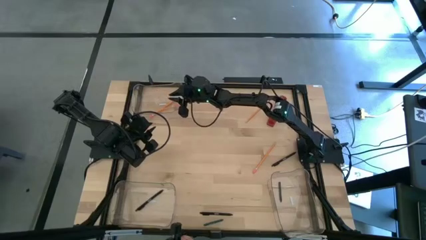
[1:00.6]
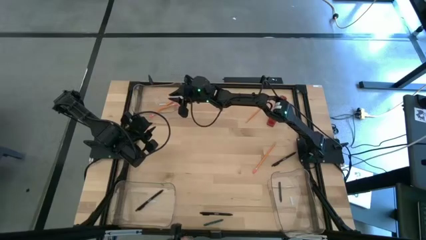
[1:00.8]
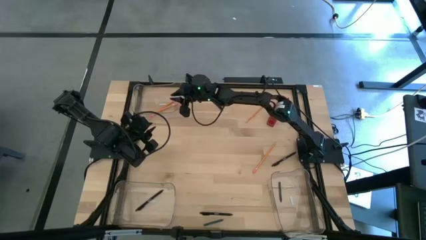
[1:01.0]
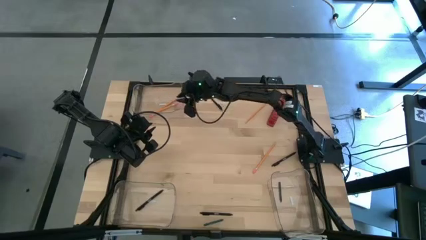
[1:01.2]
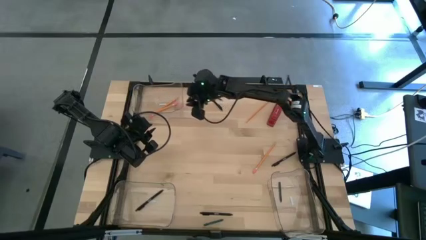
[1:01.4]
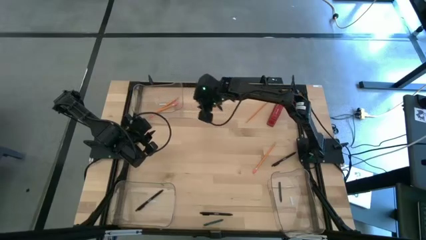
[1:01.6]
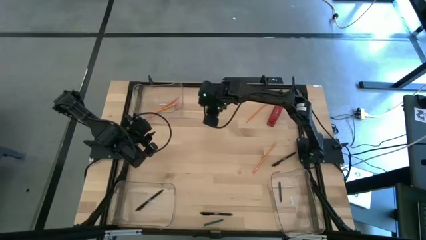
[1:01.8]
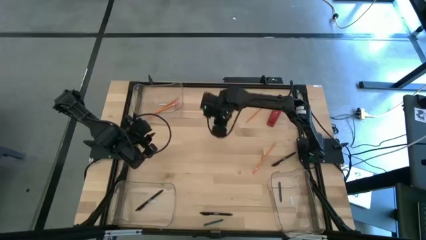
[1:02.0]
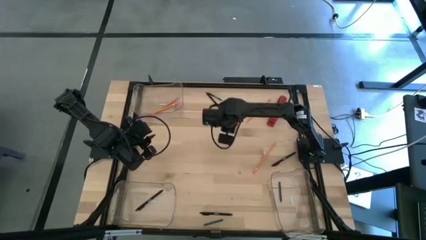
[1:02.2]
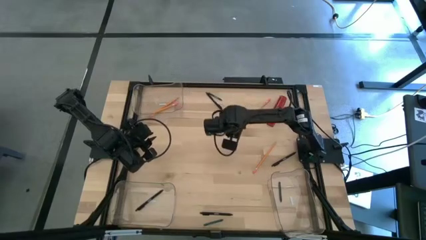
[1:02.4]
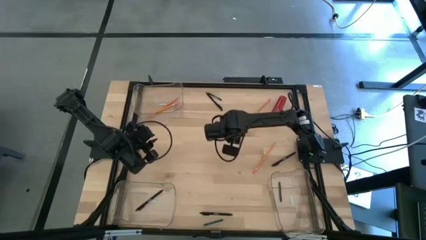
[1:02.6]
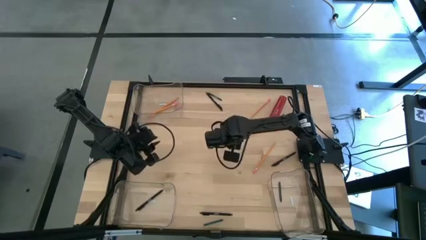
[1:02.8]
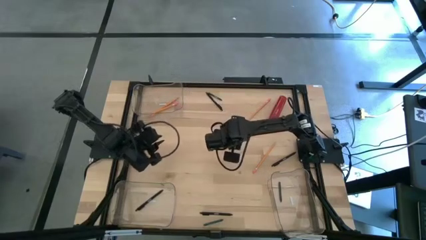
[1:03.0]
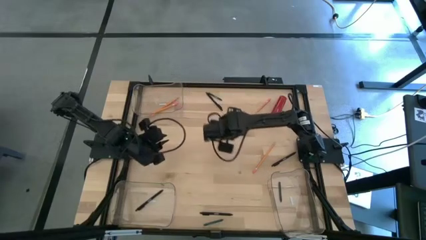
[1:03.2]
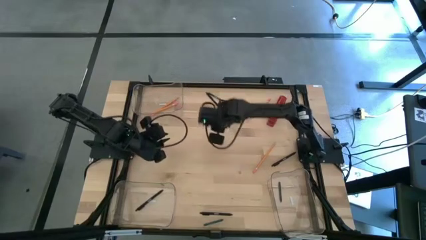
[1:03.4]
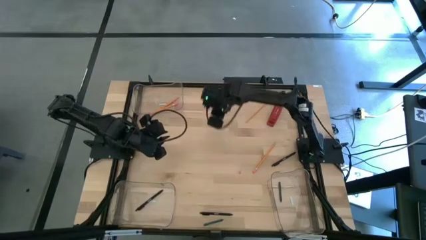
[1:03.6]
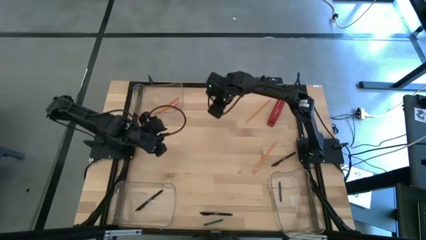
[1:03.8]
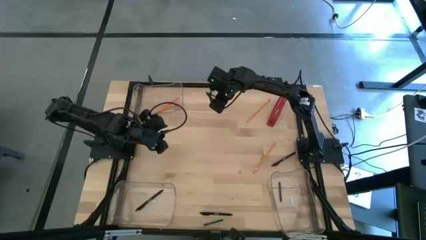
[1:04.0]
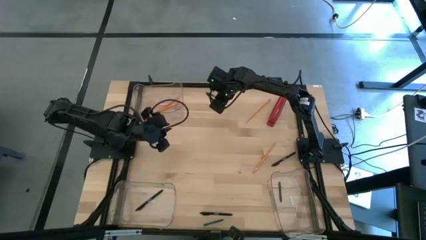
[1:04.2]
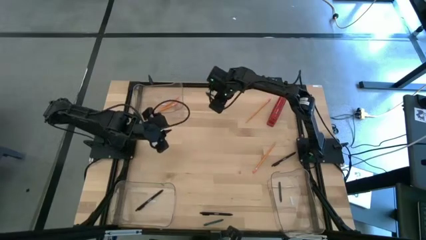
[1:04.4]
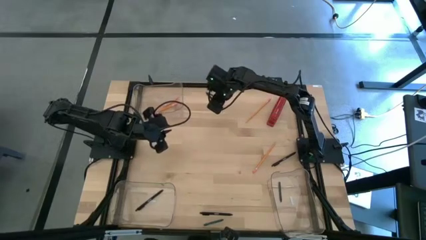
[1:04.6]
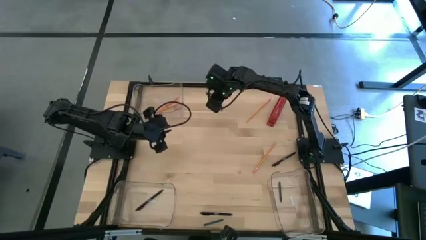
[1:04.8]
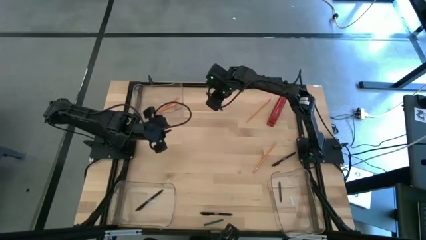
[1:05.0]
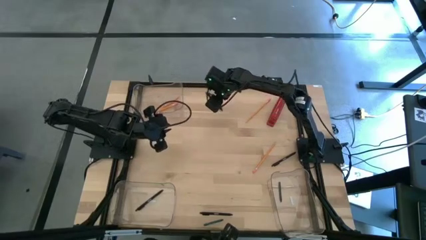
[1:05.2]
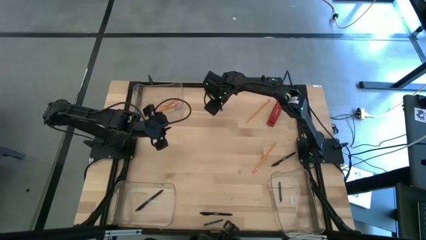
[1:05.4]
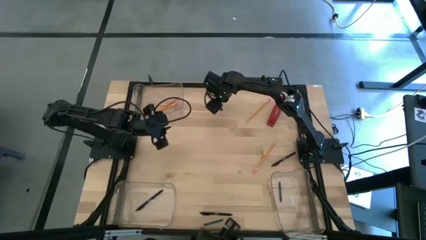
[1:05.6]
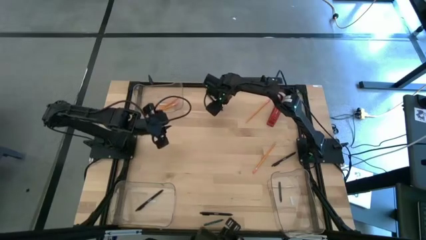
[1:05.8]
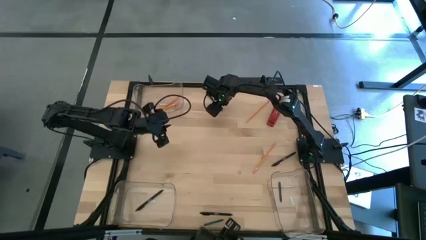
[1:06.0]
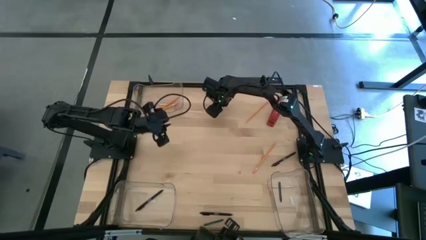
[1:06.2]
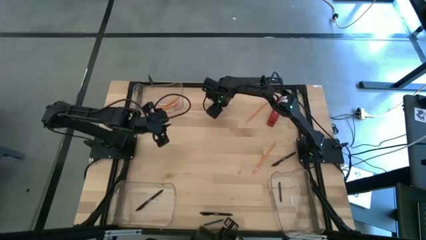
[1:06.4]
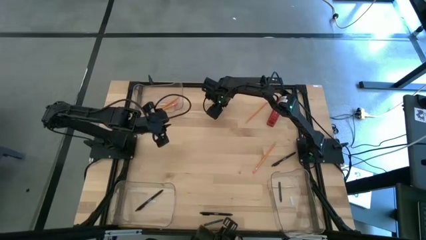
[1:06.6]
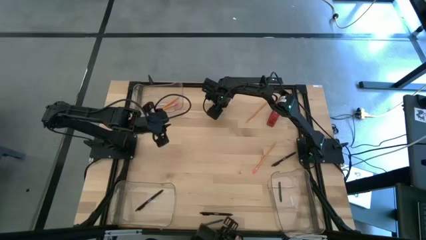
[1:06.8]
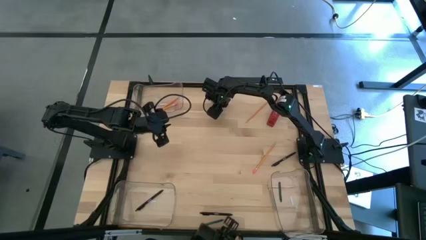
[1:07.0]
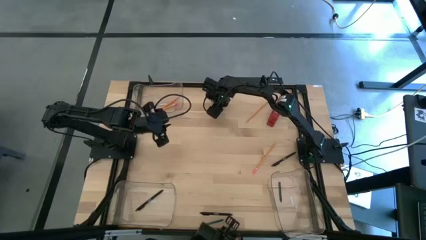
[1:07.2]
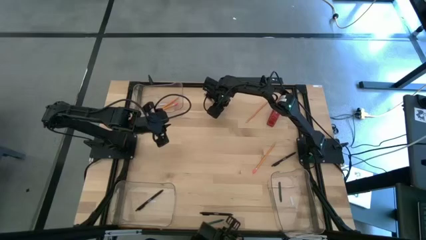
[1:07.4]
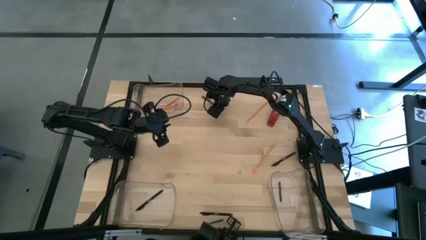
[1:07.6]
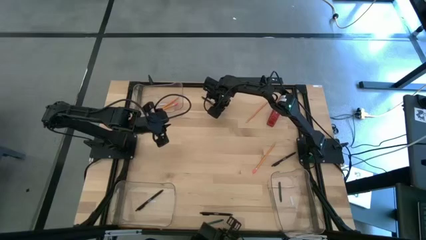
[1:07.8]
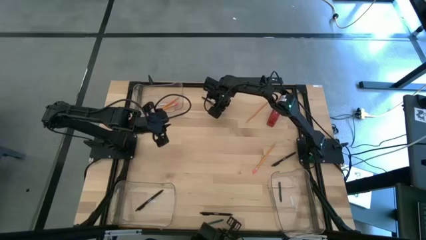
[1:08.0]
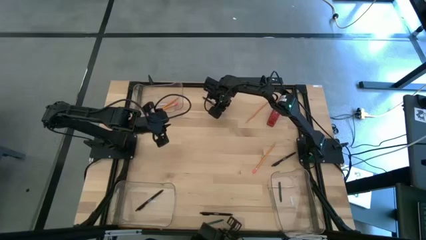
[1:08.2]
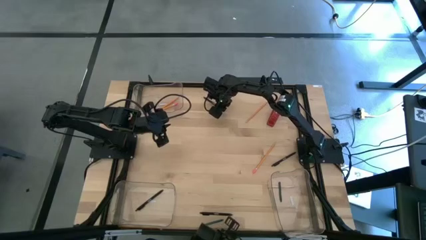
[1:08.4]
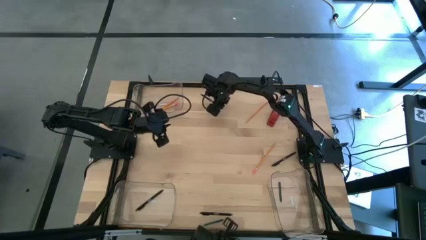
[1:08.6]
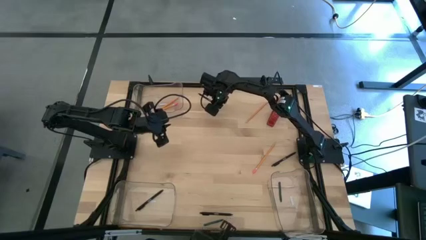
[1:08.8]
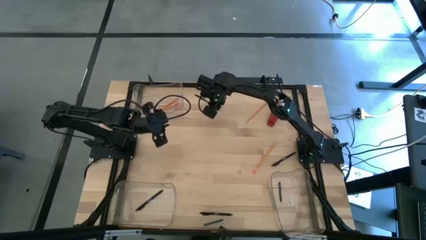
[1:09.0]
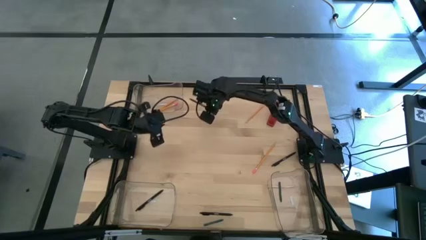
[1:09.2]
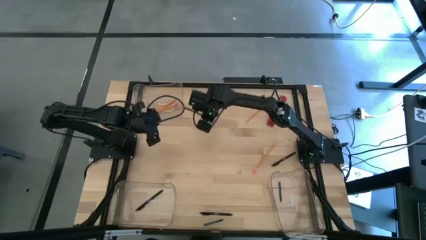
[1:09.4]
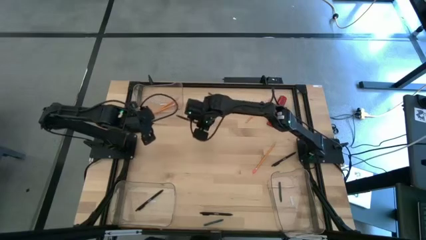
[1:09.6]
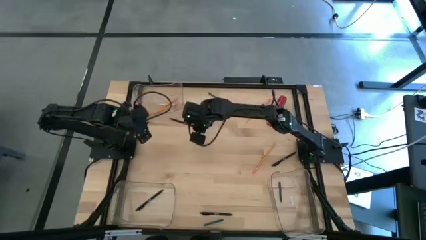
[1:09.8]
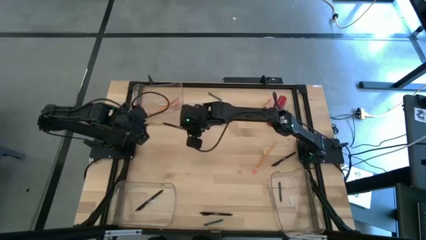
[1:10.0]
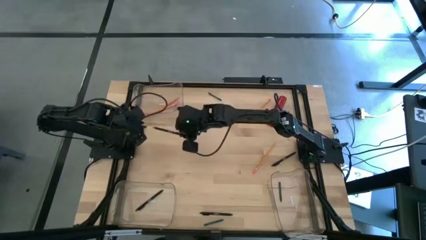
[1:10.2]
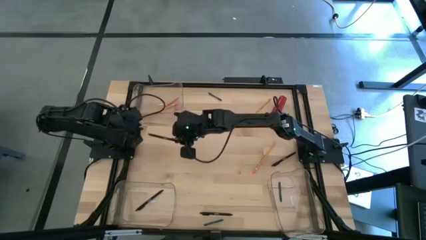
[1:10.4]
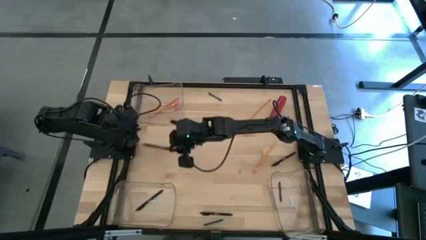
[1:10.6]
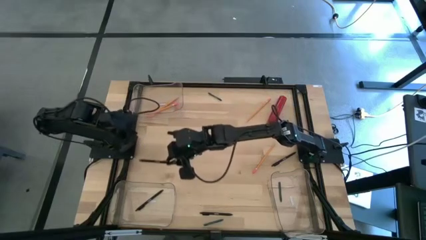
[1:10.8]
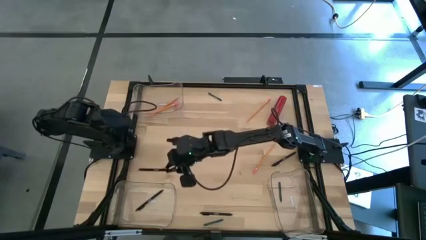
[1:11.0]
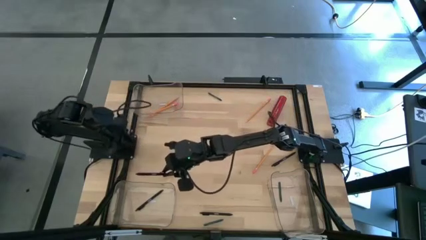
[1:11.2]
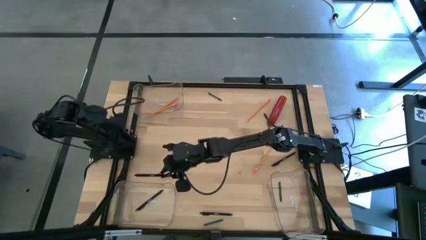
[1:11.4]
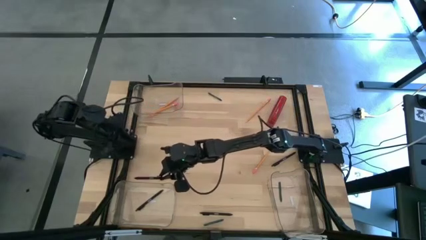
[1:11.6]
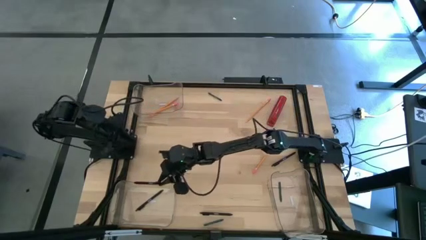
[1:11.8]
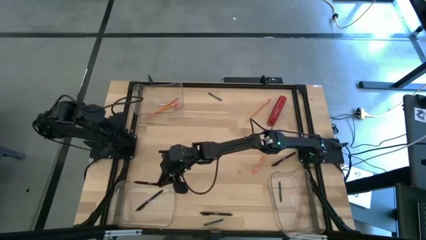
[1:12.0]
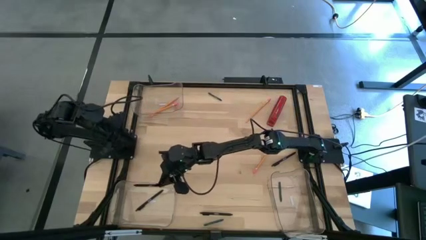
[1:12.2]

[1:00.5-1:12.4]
Task: Sort crayons/erasers/pens/pencils in bins
Put the black pen into the bottom left transparent bin

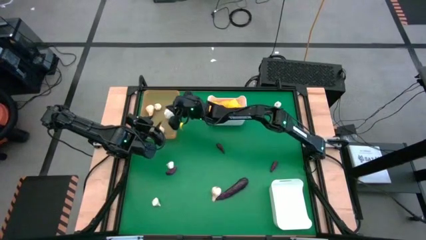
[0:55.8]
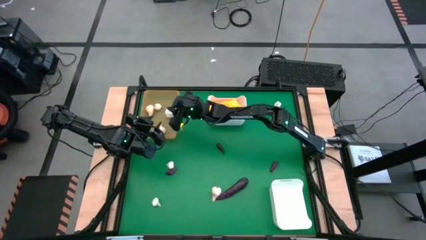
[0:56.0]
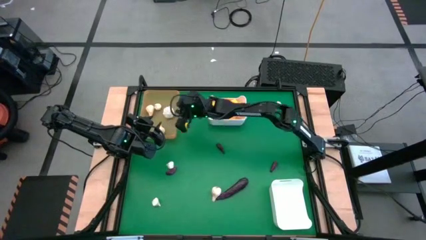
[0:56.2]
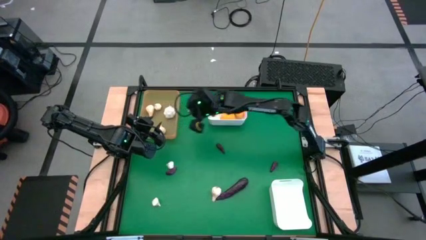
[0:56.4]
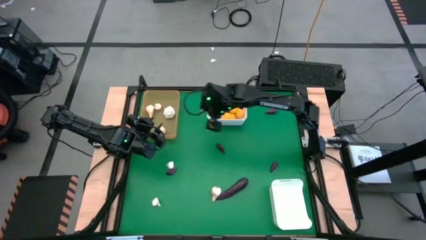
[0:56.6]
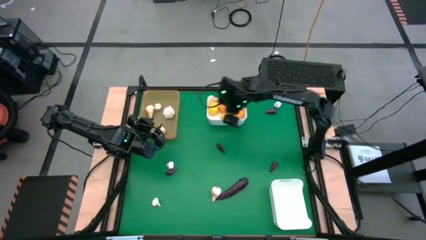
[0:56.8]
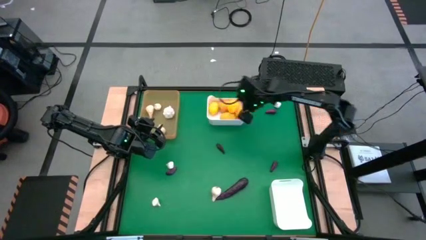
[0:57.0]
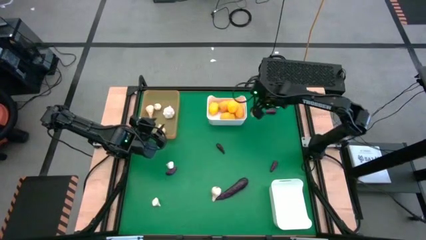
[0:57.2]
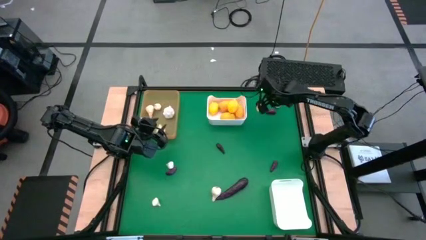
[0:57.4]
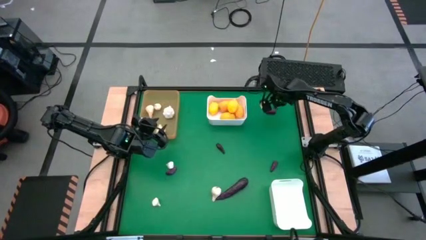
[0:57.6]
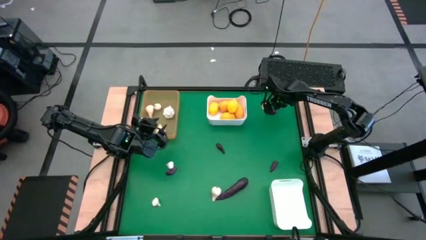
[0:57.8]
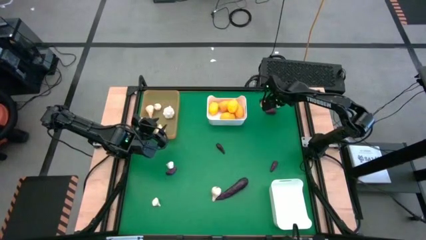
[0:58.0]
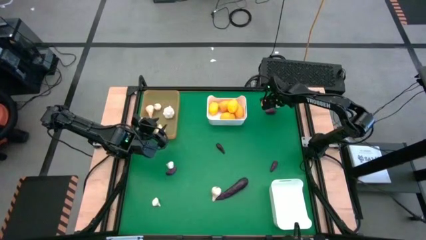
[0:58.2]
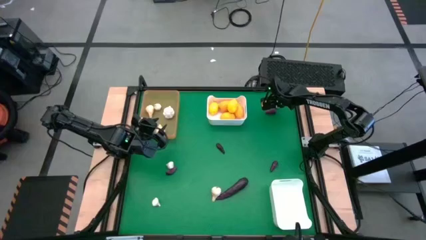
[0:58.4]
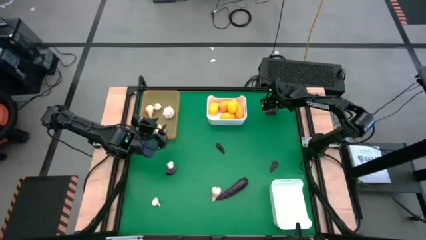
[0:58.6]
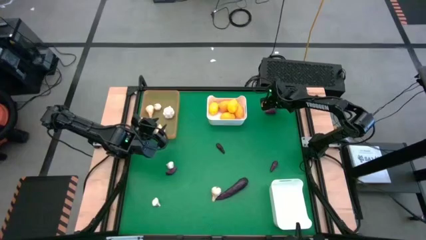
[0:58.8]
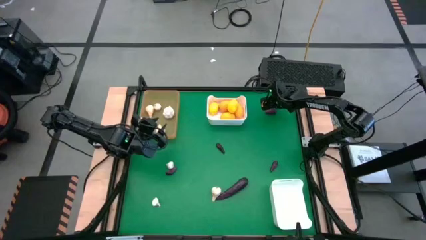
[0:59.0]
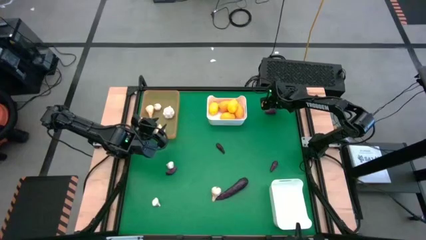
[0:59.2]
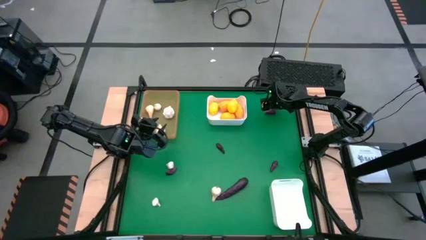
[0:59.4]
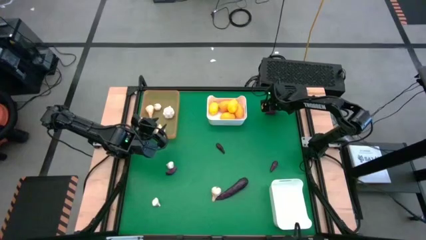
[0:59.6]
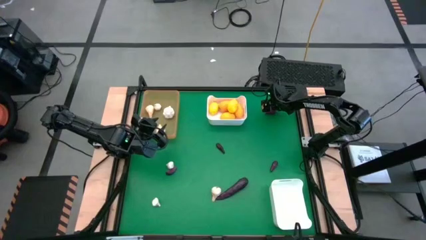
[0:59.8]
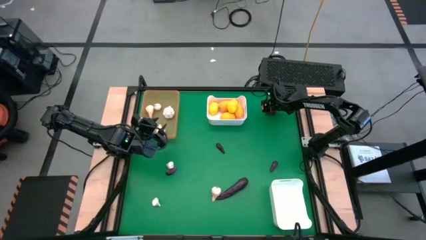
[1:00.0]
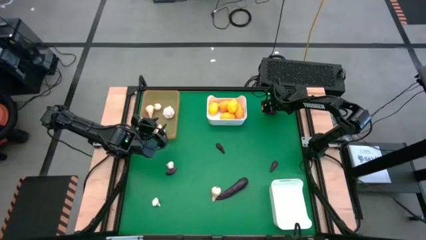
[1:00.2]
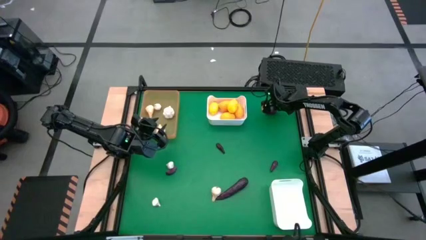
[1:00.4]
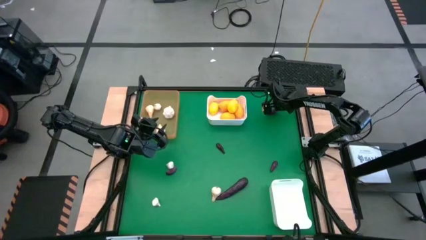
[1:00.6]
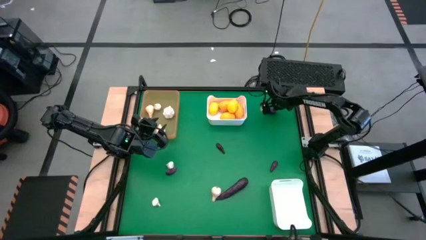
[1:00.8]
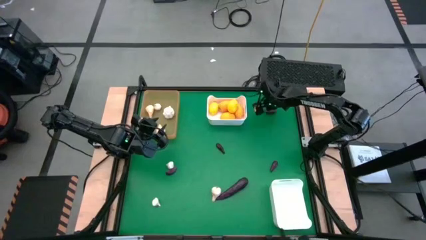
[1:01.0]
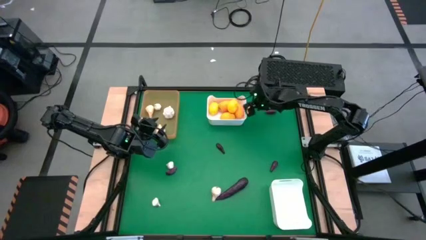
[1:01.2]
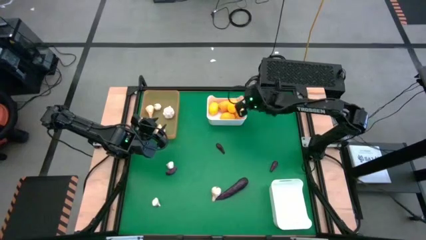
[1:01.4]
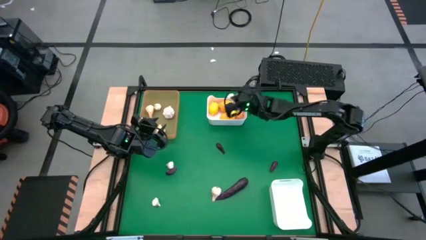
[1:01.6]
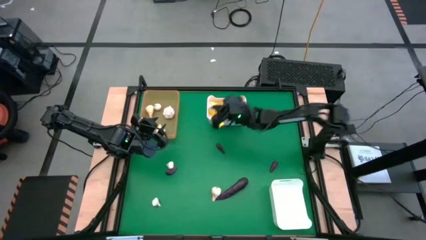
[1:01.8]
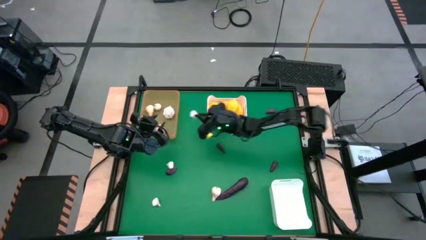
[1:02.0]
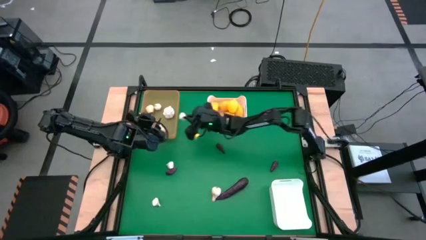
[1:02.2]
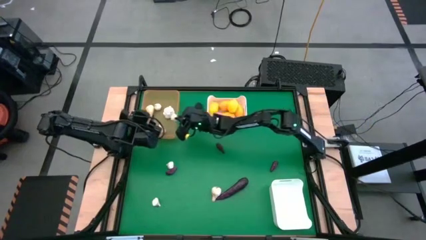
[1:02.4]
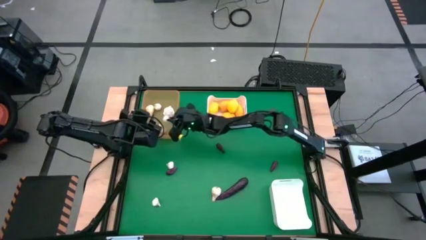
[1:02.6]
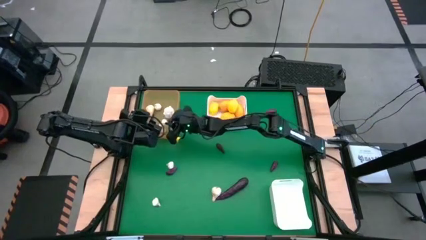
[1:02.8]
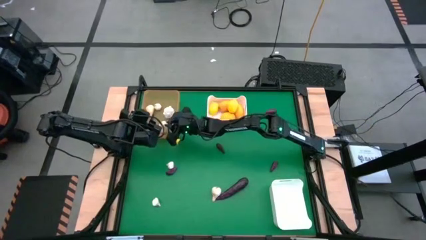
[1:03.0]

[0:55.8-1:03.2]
Task: Sort produce into baskets
Put the garlic into the orange bin
